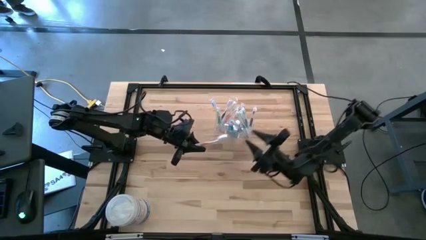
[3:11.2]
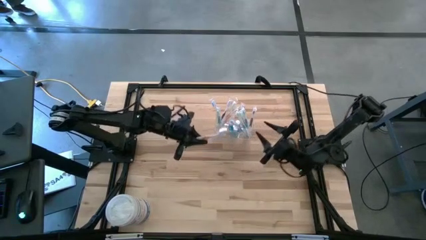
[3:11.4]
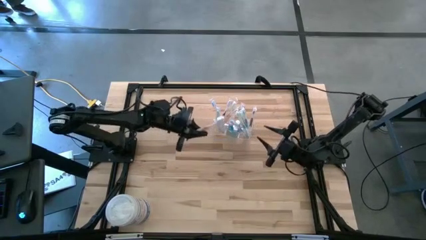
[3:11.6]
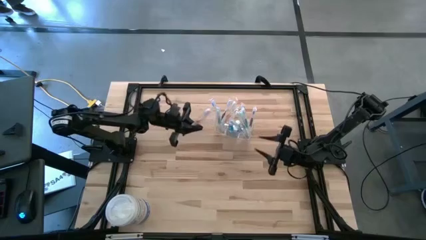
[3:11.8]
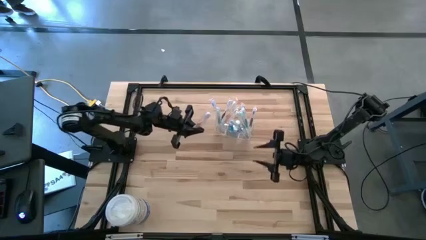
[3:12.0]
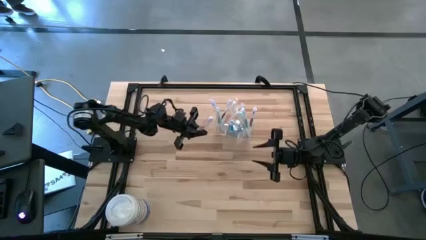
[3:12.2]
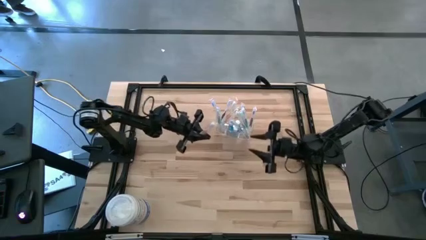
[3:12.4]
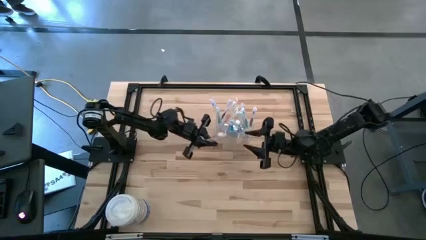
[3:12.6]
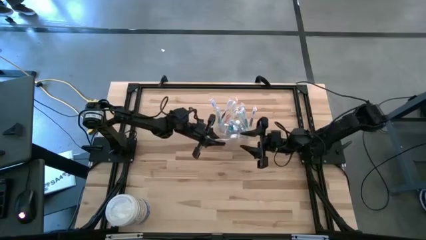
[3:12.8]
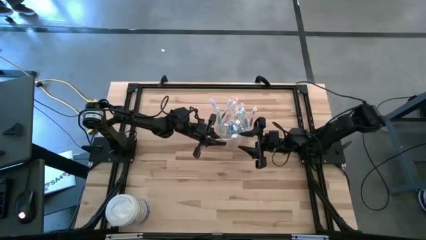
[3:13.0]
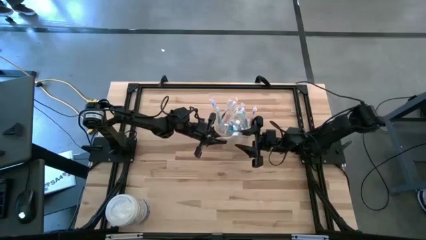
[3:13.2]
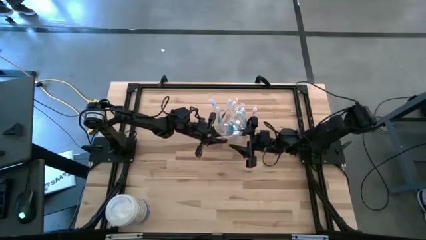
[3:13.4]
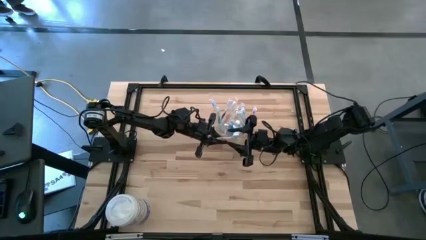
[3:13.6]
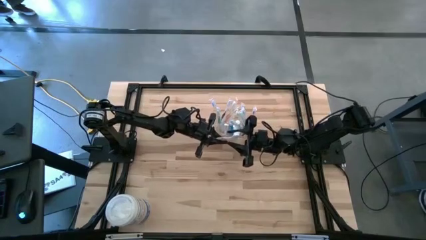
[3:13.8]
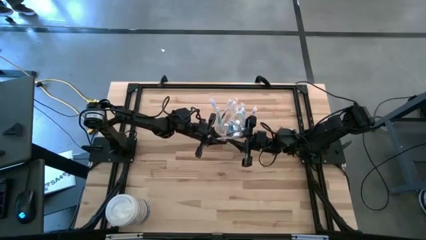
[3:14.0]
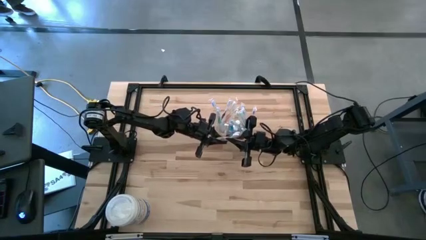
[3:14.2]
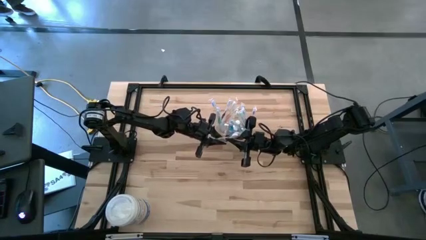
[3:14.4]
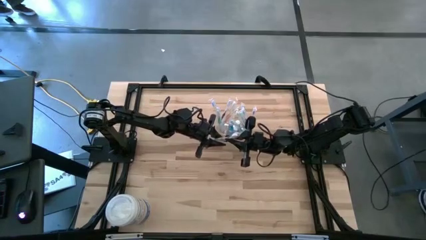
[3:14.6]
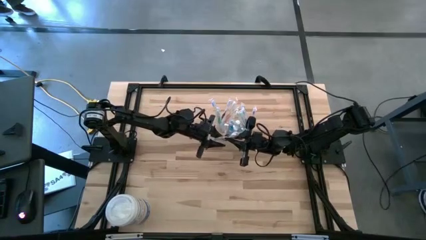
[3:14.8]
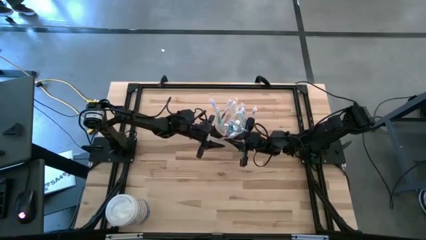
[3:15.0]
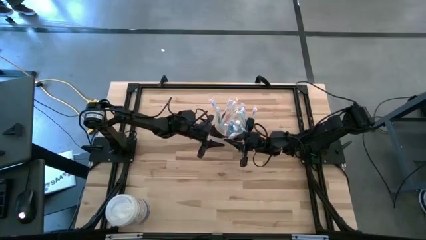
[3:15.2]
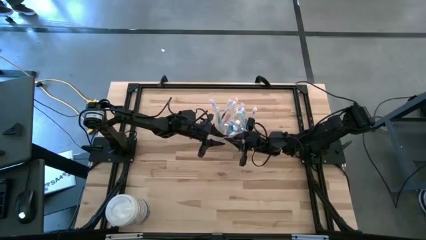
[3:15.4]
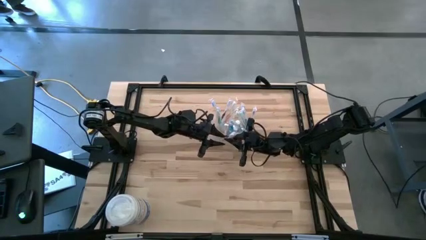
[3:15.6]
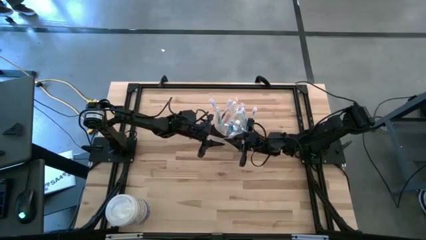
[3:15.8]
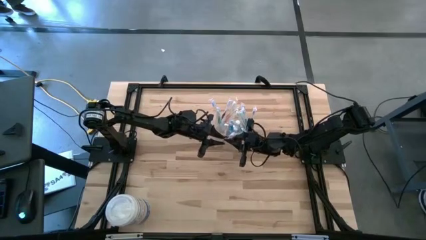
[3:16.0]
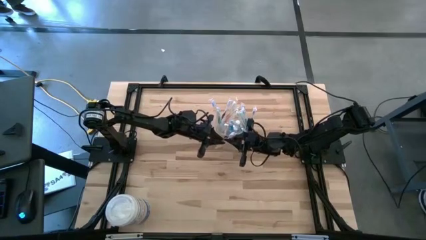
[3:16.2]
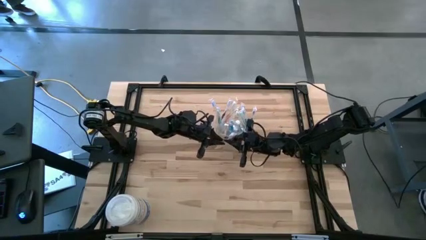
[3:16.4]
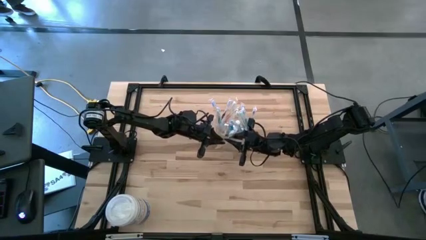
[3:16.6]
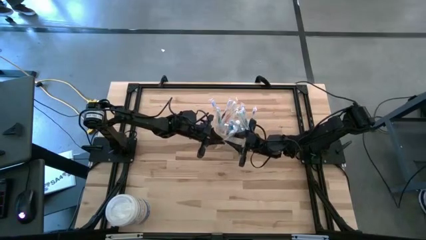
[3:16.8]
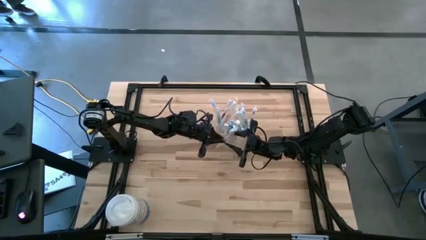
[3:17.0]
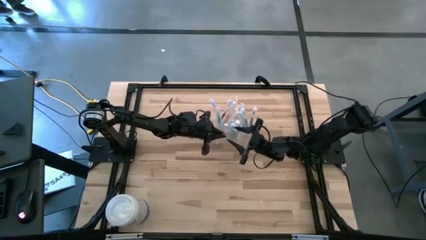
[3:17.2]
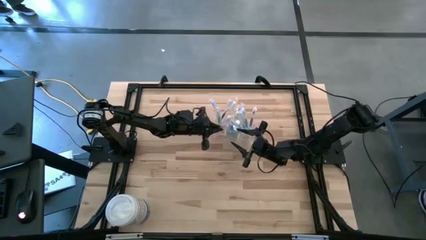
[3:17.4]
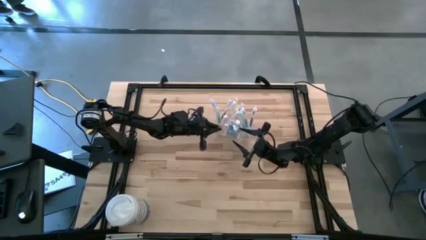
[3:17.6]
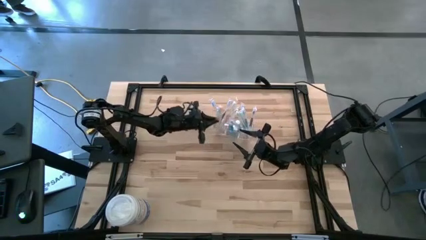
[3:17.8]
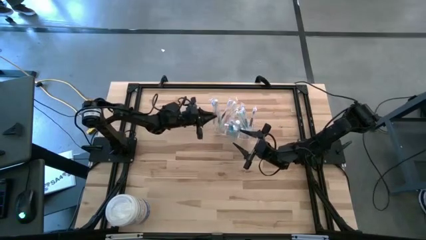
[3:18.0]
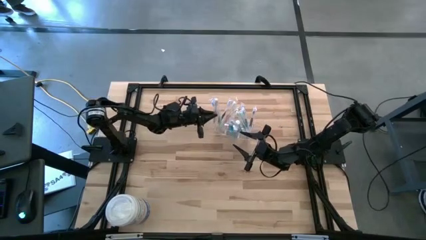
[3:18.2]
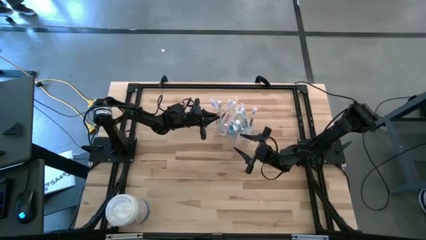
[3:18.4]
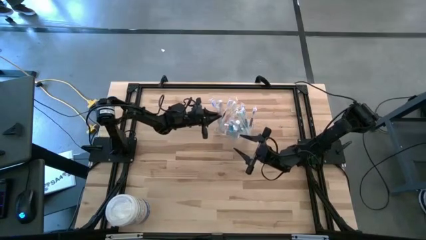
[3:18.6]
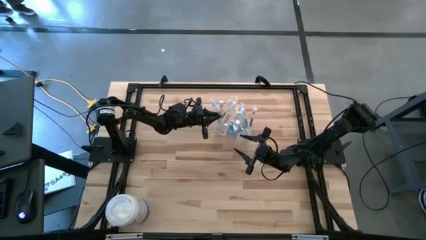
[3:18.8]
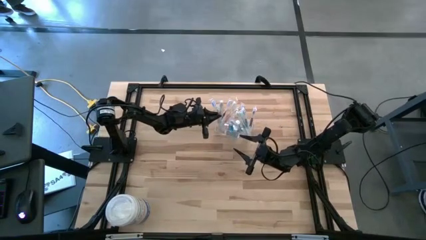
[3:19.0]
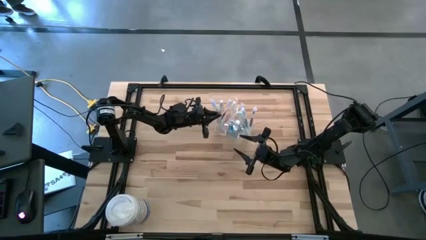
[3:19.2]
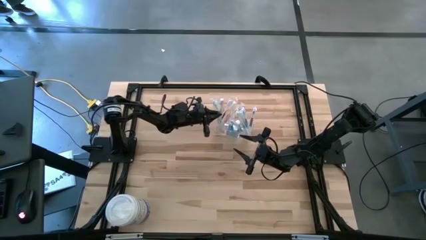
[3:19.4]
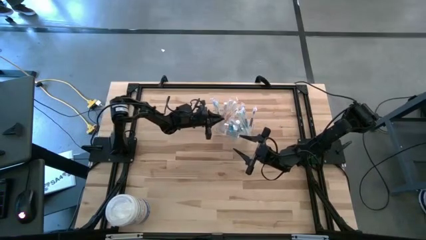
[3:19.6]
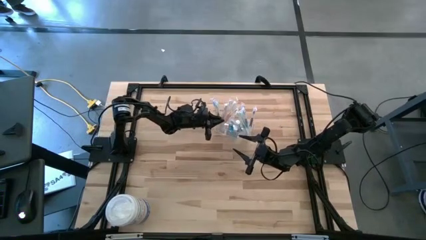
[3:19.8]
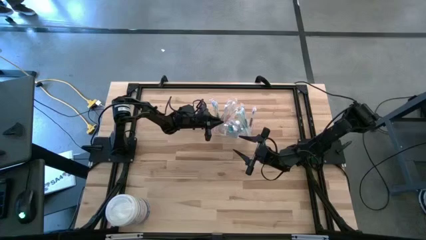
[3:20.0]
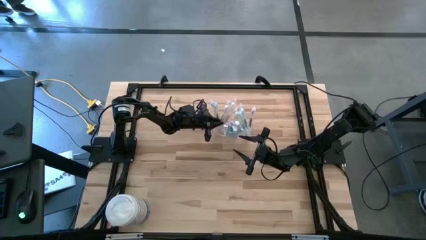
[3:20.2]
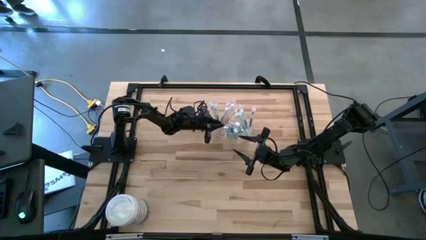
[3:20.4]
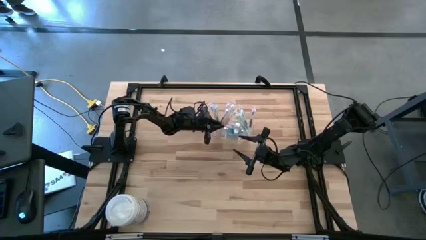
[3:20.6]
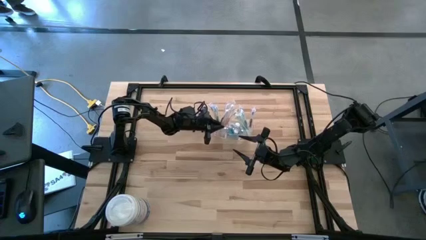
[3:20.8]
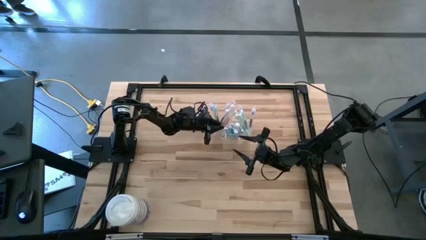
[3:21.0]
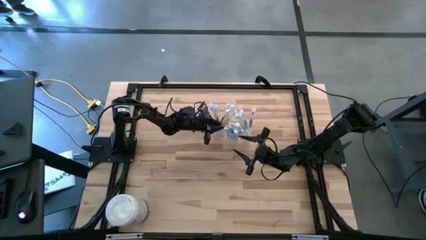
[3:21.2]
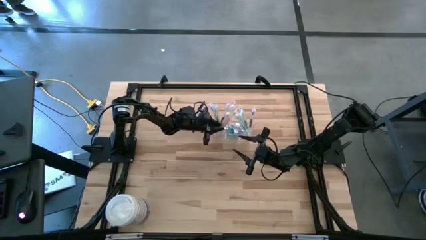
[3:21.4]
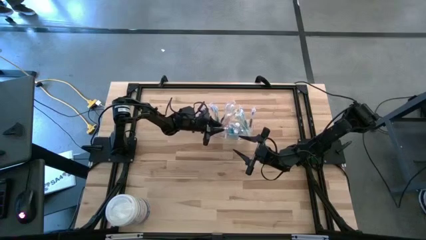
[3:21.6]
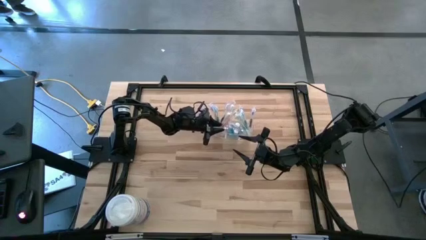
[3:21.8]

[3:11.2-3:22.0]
Task: Pick & Place toothbrushing station
Put the orange toothbrush into the transparent organizer

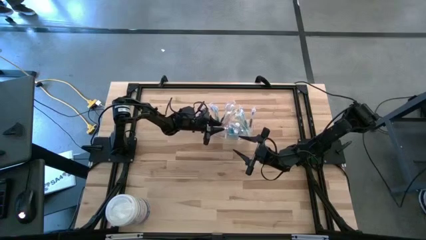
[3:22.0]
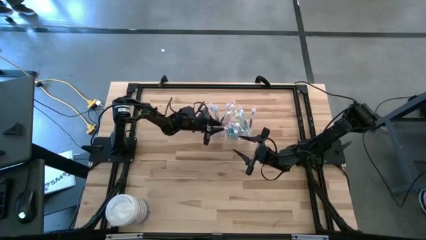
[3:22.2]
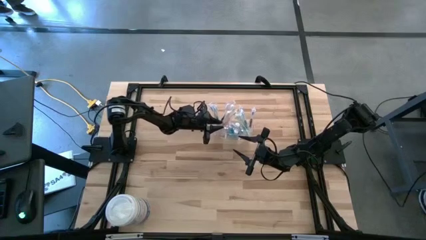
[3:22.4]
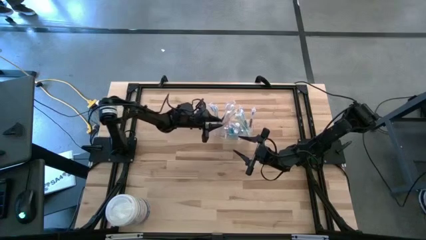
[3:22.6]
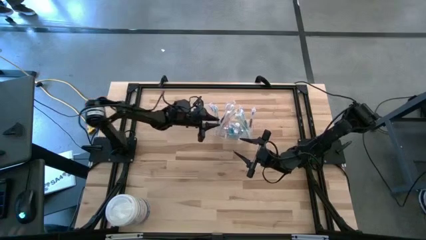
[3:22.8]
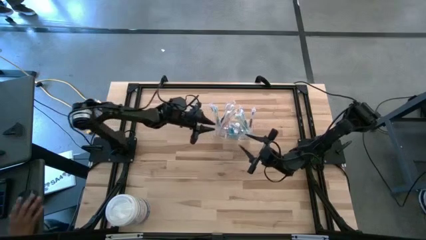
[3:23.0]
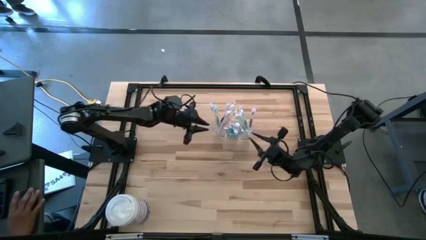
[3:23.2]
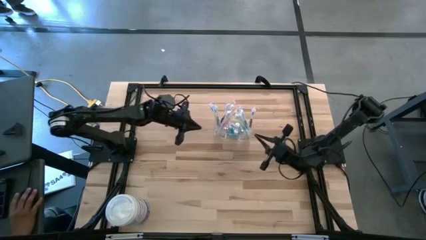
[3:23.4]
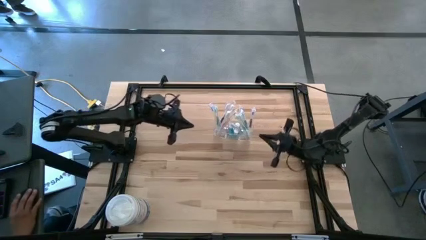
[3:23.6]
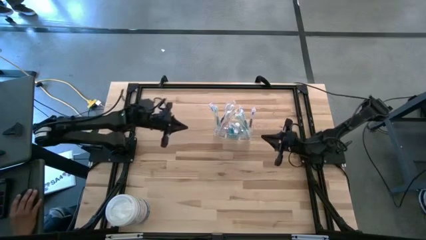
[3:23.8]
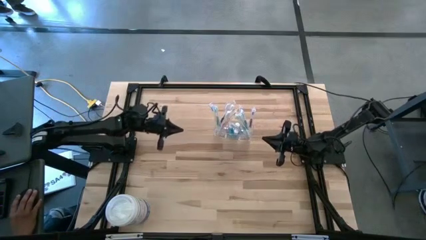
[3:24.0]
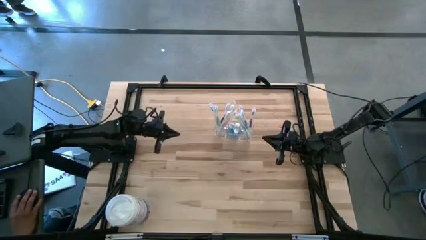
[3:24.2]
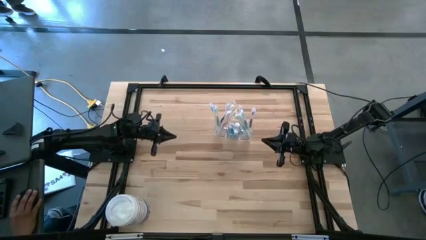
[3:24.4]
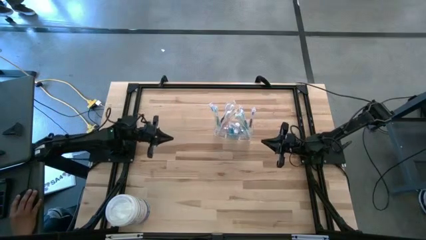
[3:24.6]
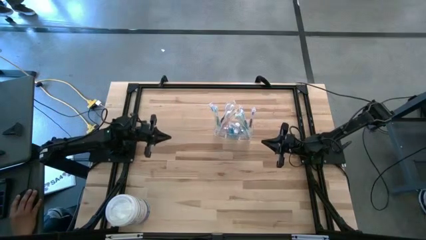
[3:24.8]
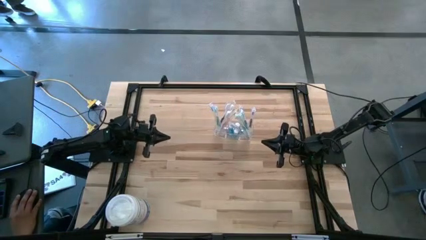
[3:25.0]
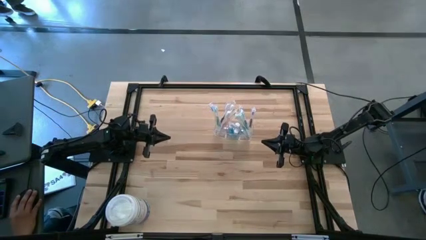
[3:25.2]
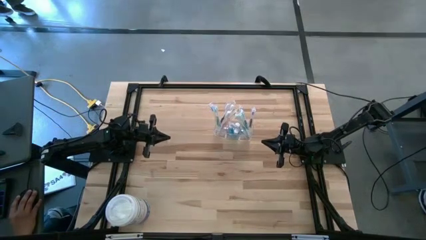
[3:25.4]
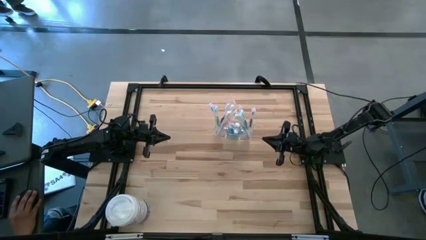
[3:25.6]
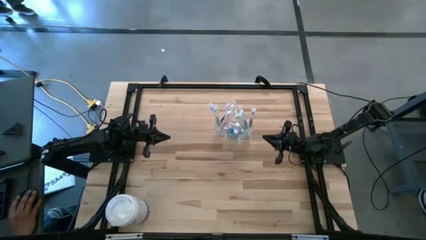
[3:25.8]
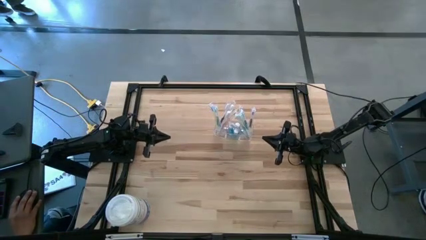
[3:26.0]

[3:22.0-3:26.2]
Return to Home Position

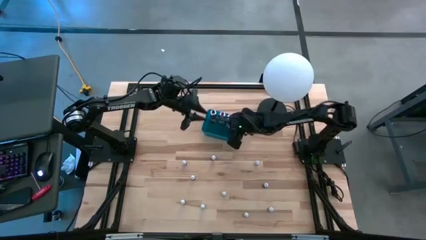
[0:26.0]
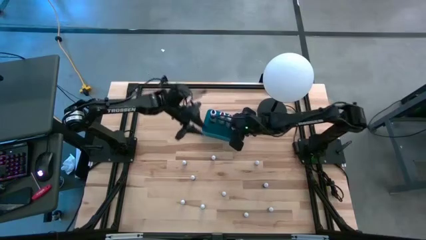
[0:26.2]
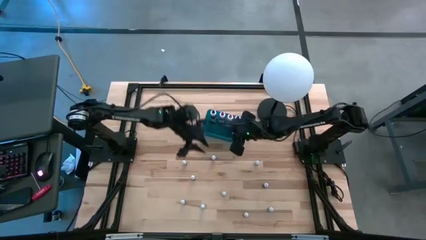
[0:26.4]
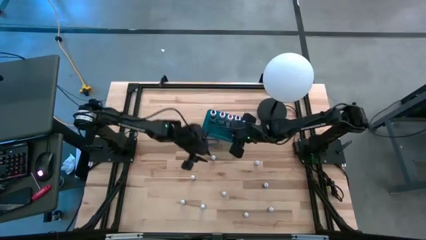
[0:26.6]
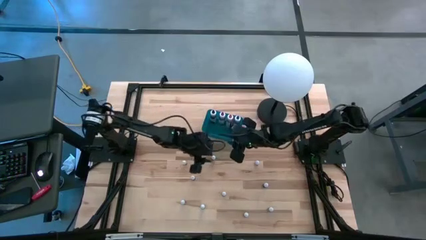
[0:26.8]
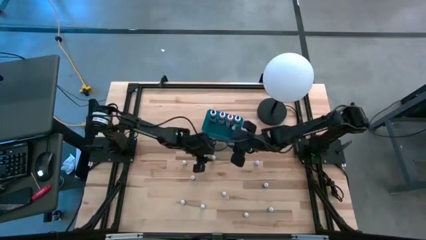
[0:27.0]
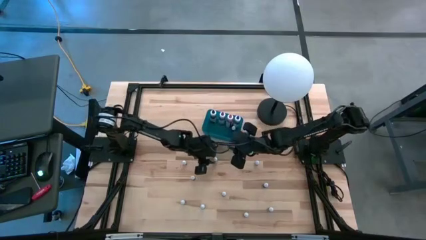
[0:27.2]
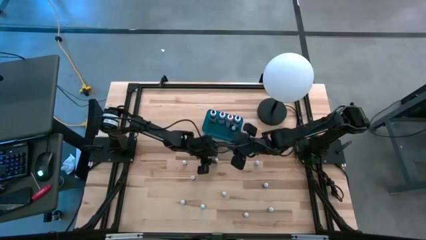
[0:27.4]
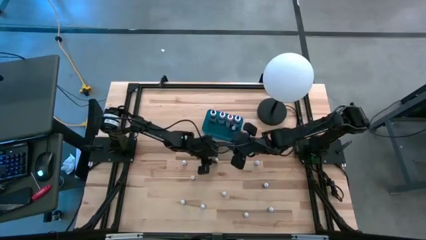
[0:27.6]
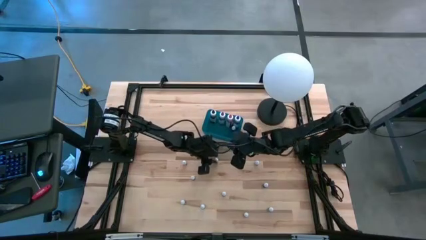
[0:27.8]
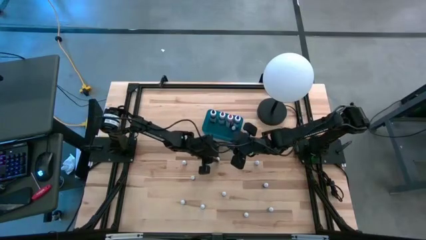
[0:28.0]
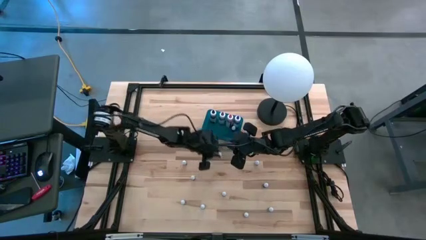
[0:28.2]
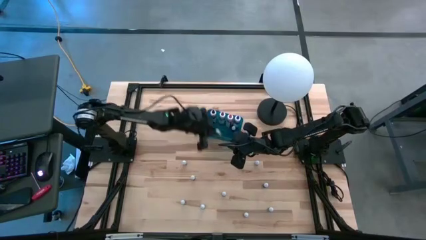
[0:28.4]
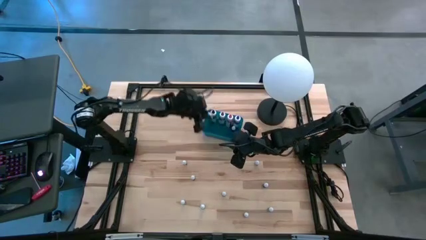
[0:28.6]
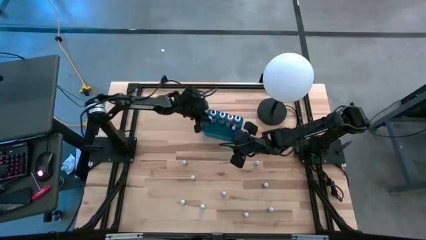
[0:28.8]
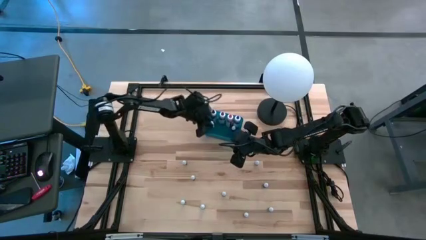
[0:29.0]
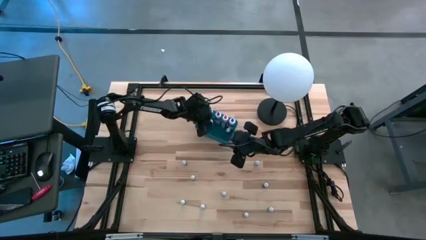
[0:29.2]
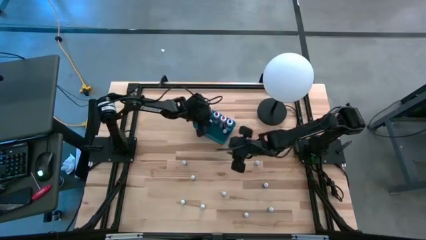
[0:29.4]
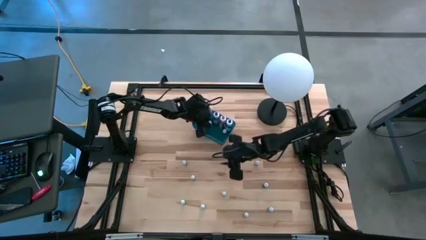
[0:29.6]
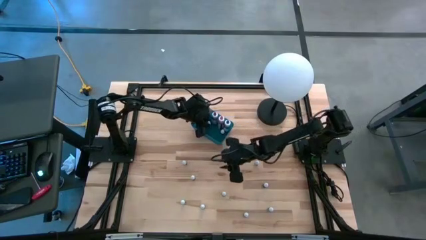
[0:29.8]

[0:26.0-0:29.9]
Task: Pick & Place food coloring
Put the small green food coloring bottle into the blue bin
